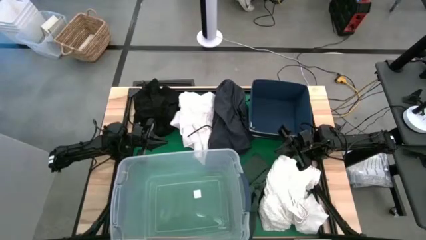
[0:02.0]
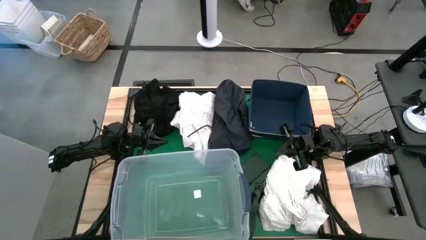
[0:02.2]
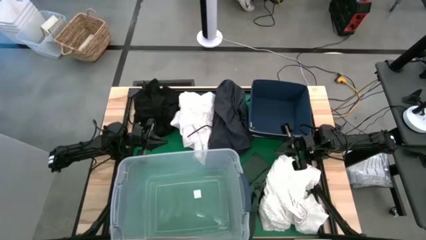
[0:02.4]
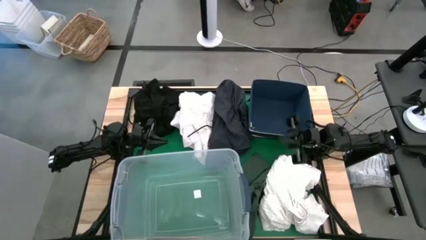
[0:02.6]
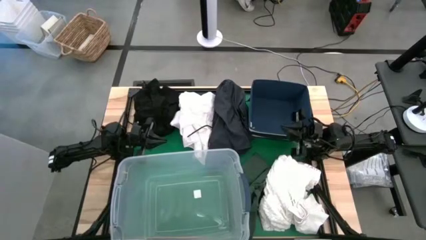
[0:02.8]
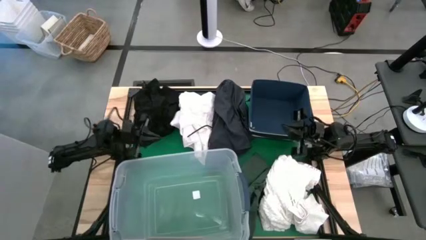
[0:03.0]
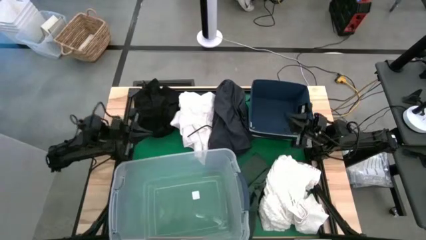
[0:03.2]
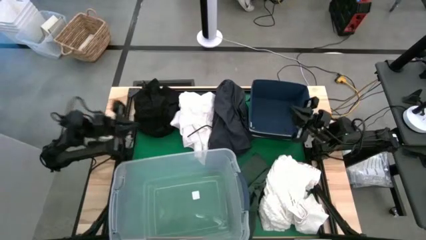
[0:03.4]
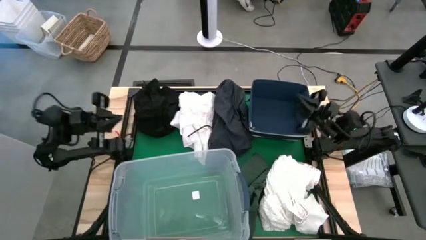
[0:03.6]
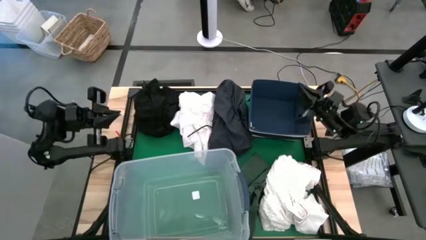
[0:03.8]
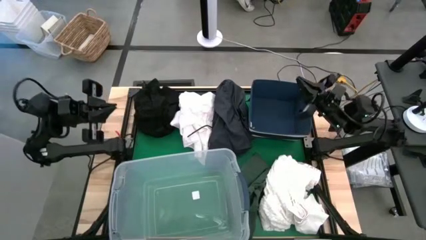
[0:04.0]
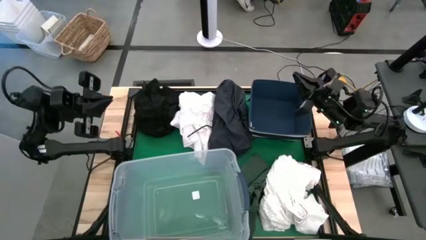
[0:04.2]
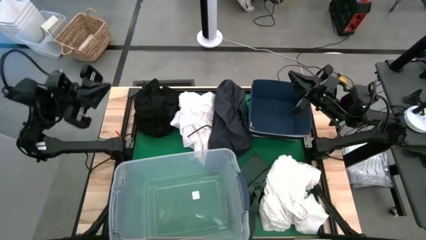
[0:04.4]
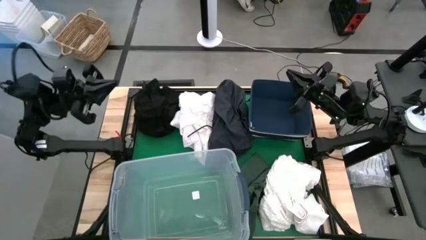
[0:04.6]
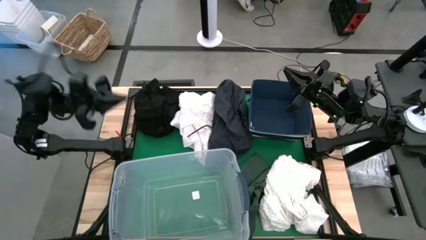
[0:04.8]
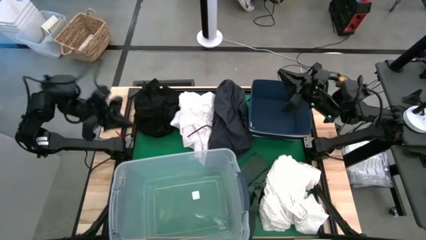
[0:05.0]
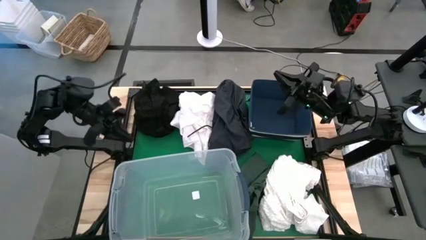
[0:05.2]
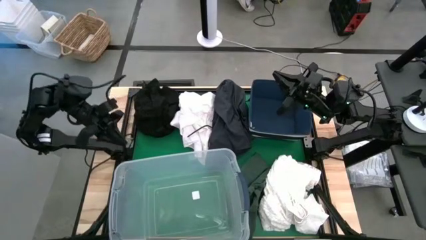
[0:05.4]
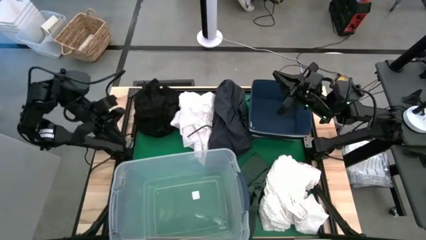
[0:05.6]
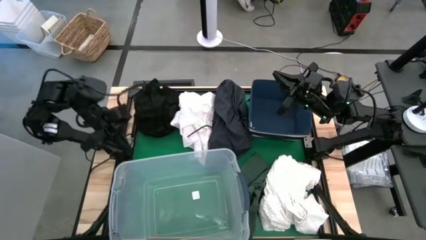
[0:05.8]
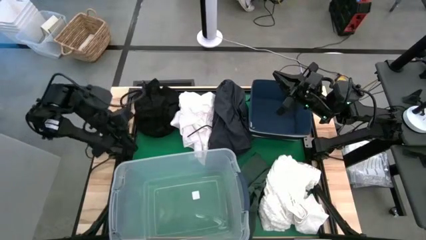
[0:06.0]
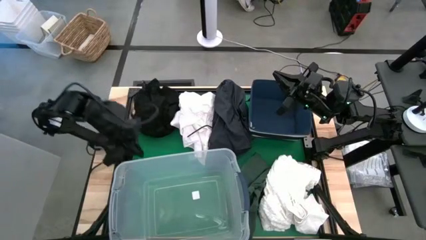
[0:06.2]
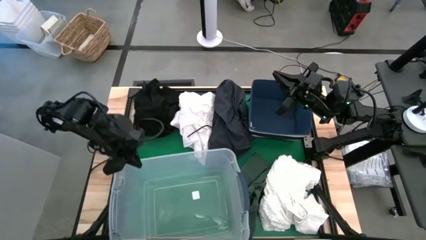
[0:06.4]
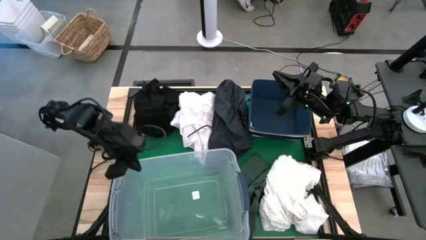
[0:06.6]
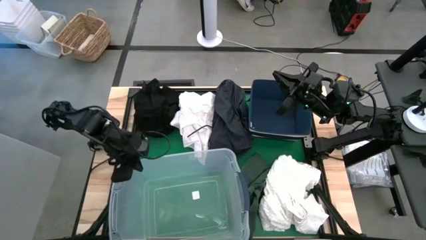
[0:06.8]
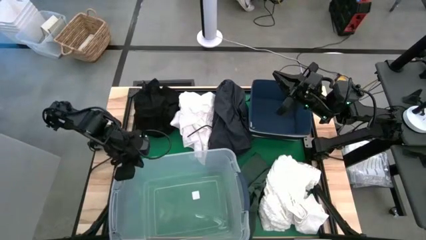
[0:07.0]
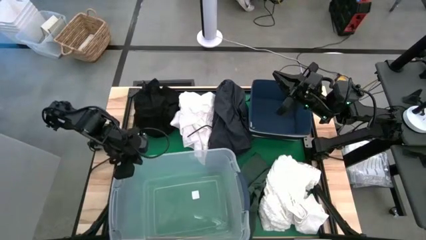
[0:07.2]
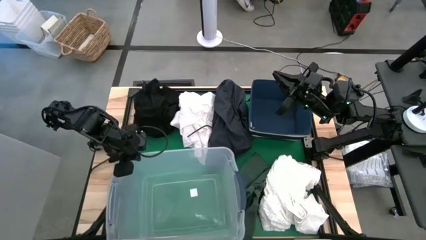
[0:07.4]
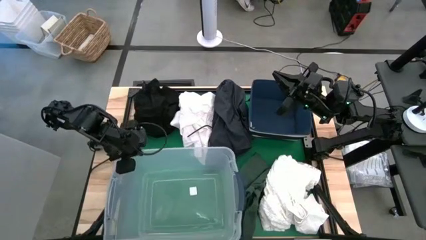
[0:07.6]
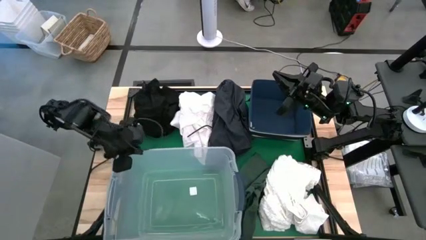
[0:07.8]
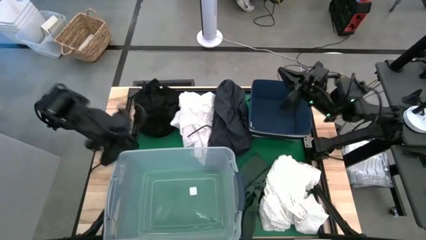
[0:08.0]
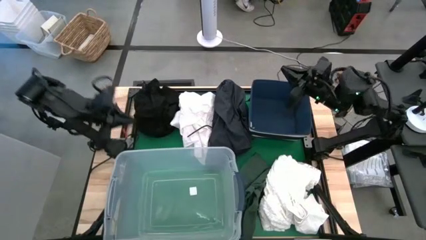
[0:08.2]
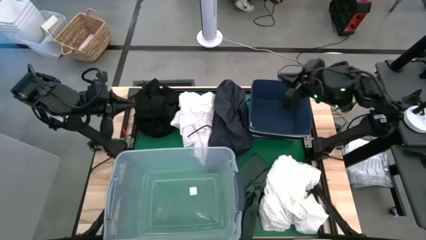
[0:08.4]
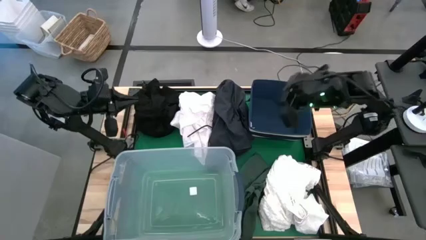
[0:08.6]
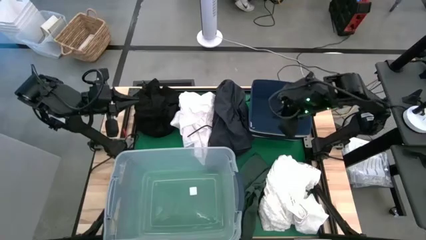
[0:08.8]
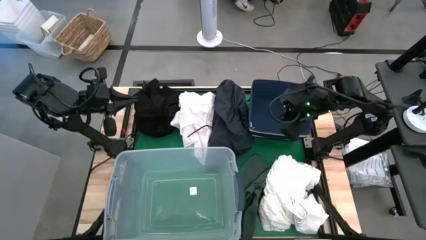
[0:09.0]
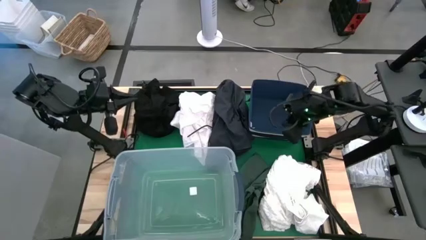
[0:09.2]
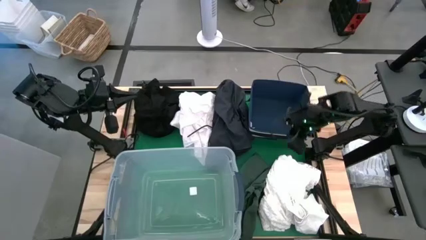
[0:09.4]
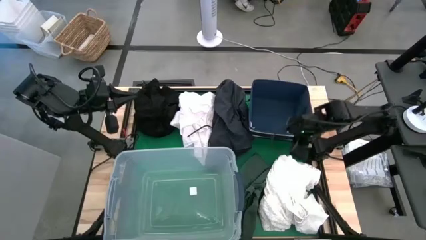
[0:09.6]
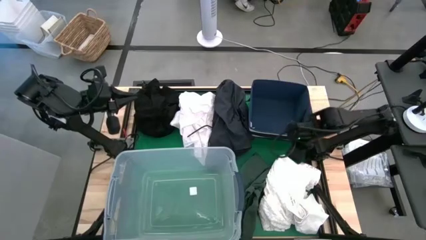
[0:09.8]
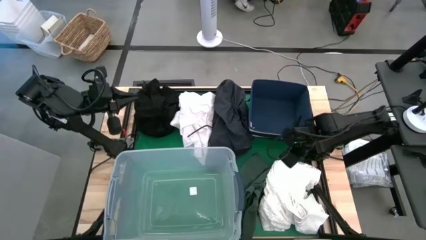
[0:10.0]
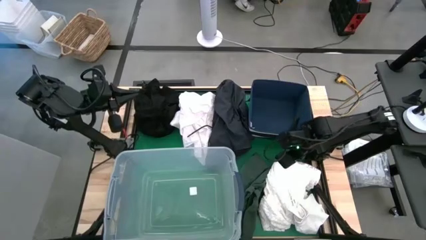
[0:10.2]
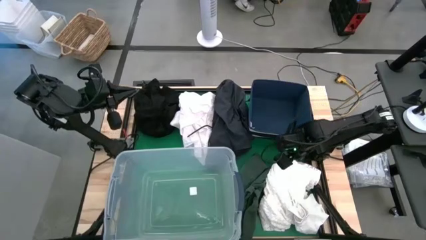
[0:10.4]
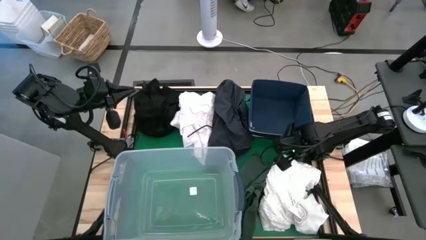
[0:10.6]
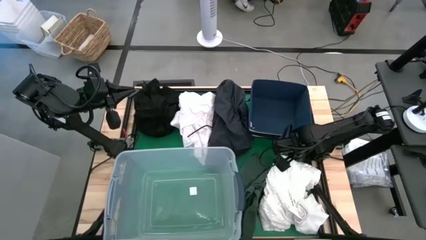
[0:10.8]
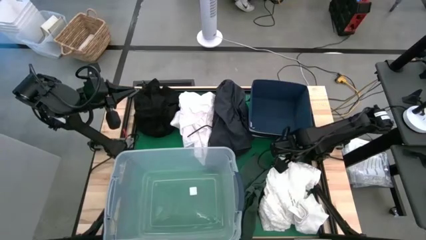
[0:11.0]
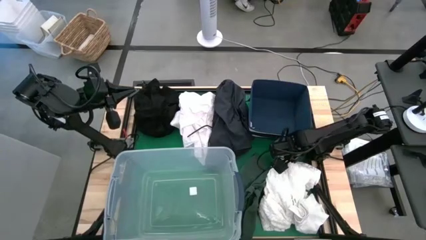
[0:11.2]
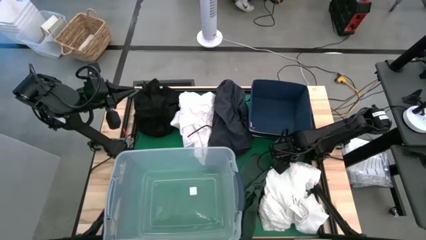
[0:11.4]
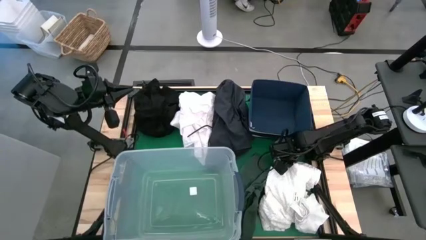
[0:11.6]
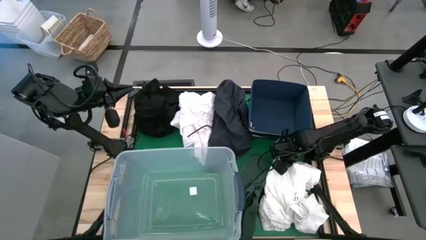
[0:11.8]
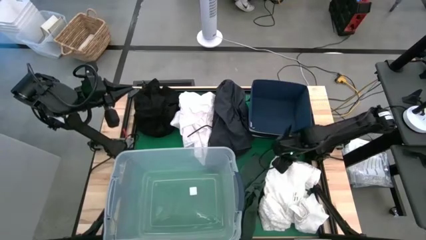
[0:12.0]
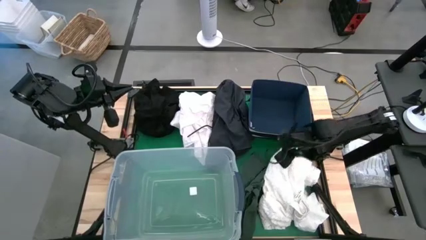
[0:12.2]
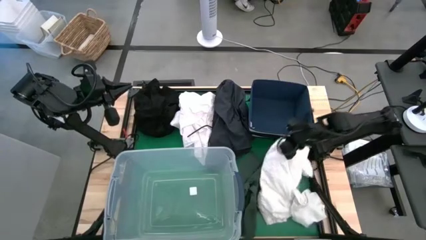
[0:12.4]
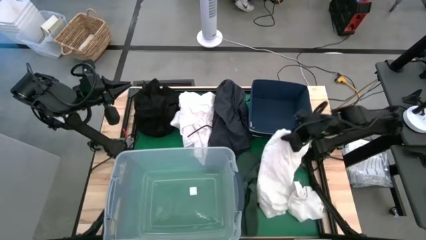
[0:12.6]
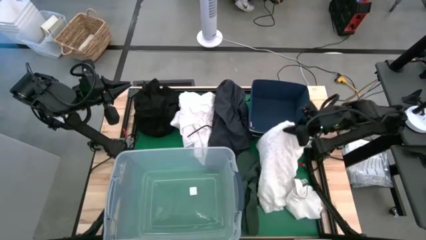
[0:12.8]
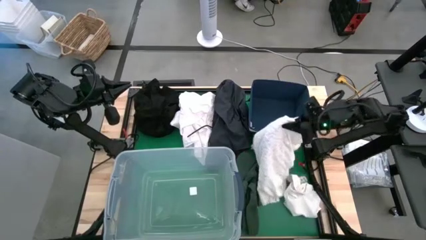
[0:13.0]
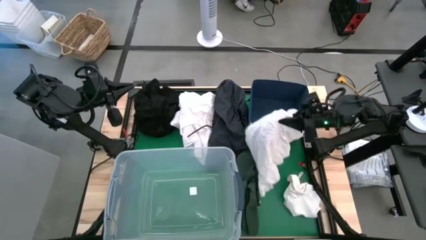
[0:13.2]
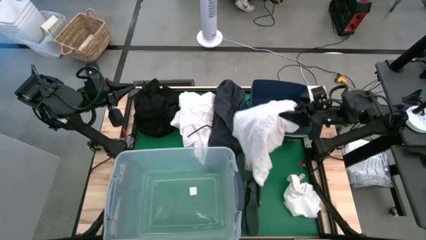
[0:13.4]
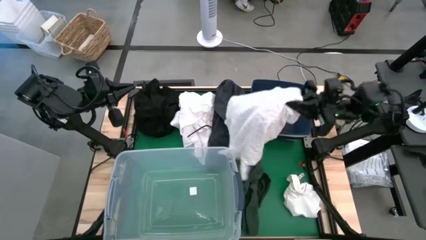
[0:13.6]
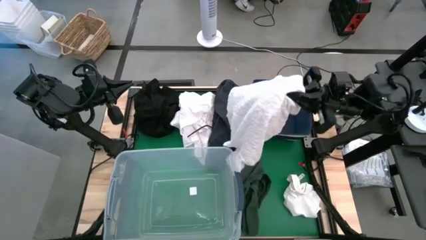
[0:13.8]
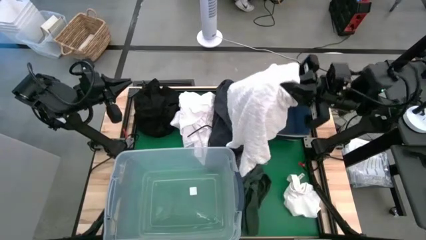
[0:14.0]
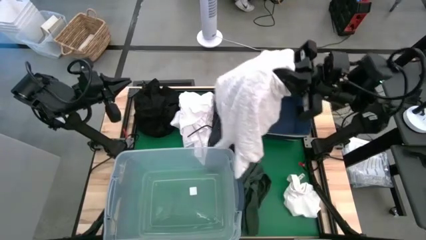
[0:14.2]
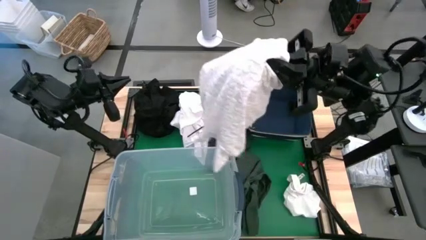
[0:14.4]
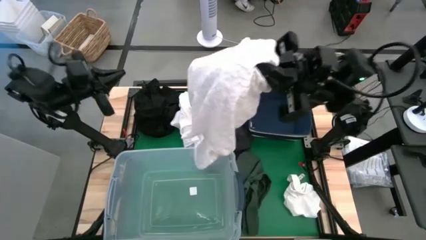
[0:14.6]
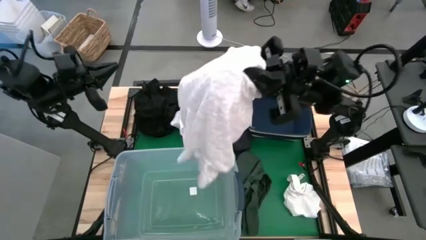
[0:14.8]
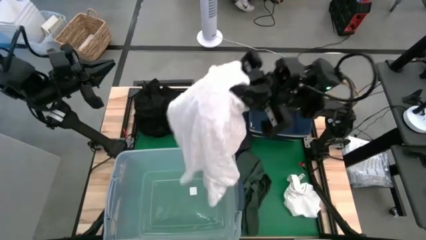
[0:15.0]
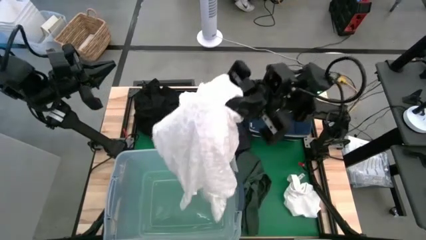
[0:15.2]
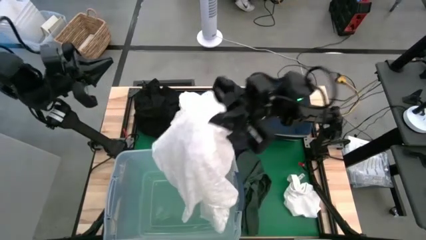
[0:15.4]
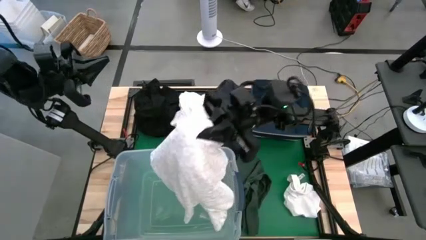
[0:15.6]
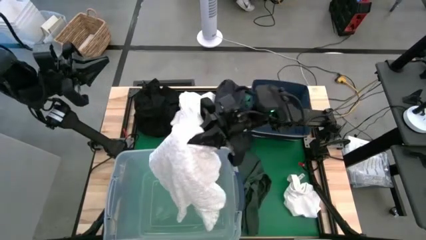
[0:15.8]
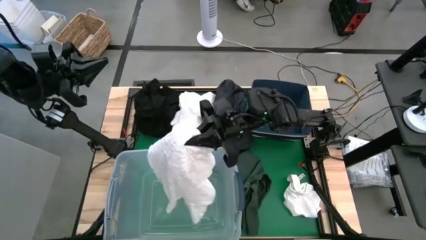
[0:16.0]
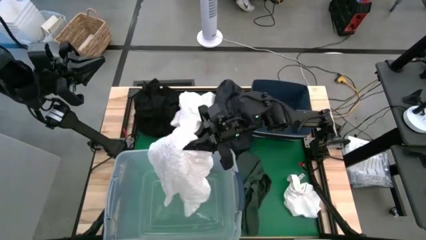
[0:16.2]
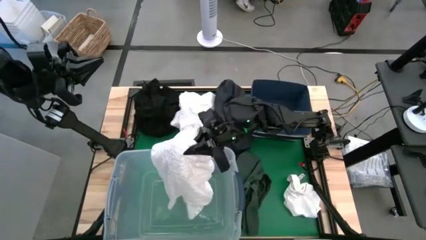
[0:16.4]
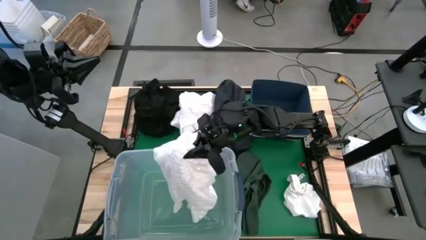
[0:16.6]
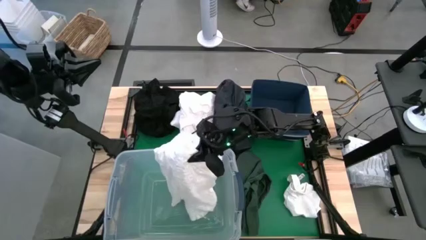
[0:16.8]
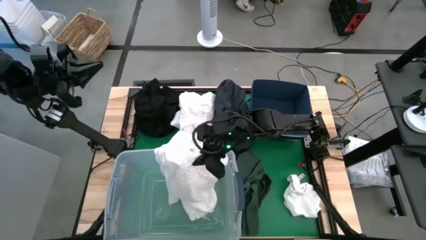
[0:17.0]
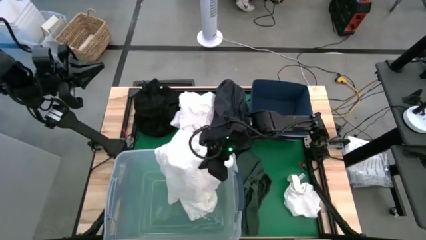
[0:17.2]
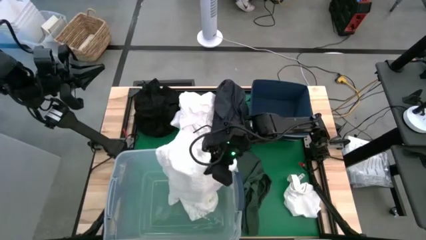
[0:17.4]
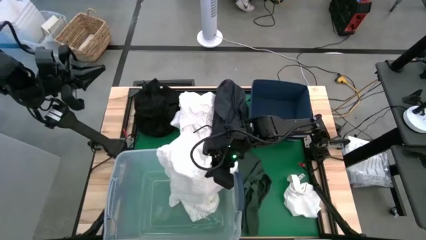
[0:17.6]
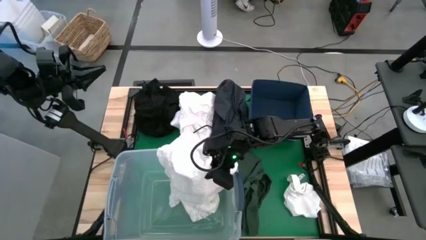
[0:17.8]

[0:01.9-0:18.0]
Put the white blouse into the transparent bin
